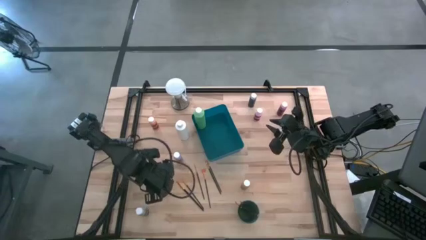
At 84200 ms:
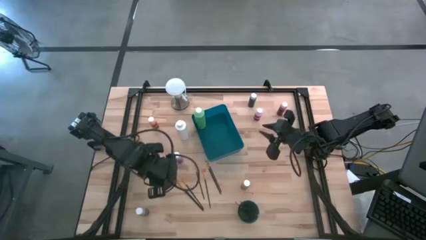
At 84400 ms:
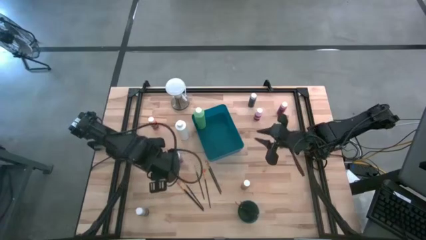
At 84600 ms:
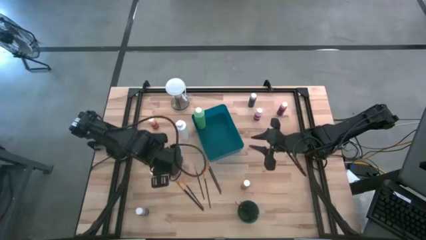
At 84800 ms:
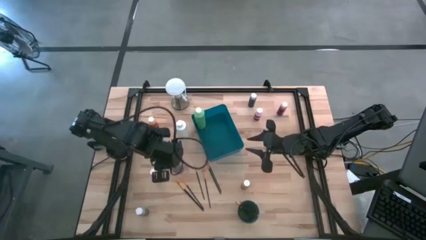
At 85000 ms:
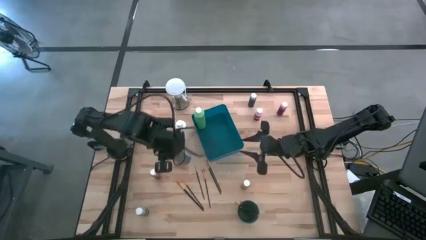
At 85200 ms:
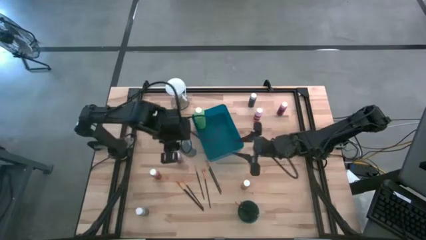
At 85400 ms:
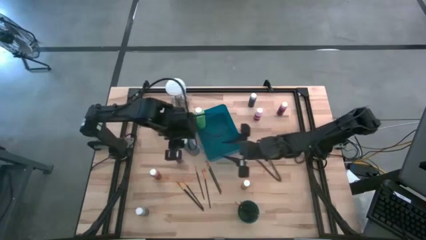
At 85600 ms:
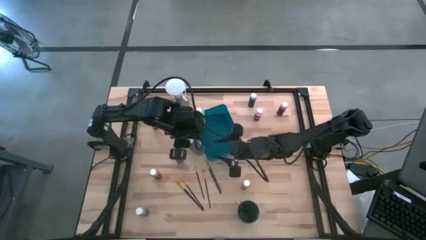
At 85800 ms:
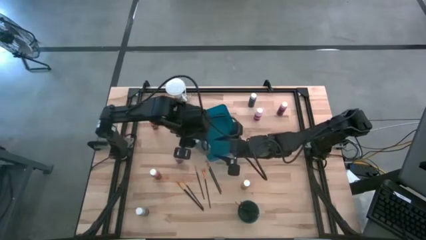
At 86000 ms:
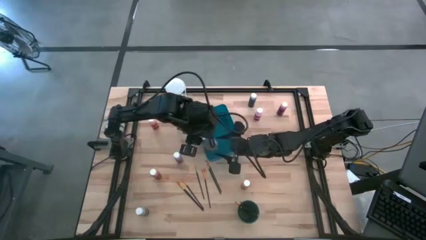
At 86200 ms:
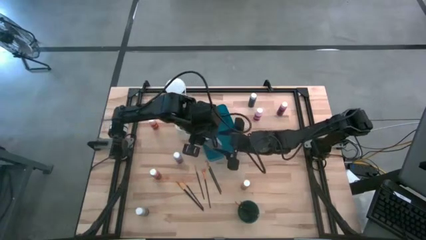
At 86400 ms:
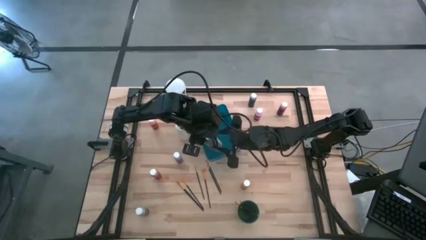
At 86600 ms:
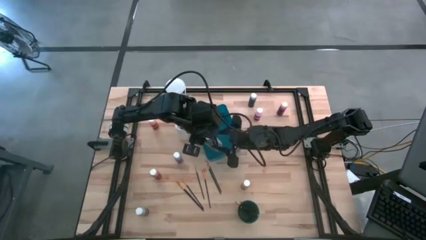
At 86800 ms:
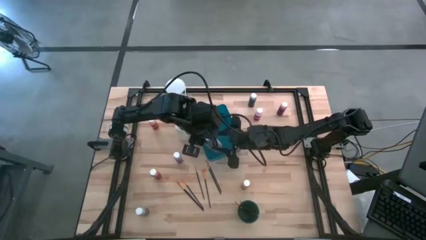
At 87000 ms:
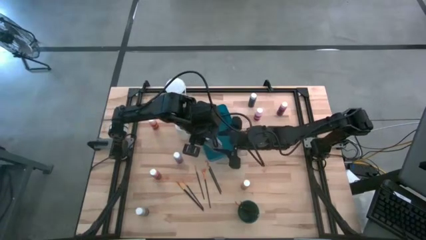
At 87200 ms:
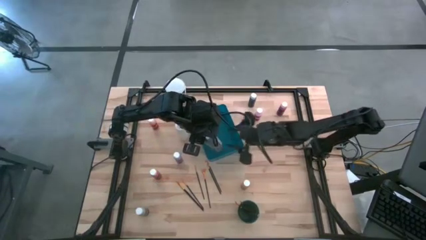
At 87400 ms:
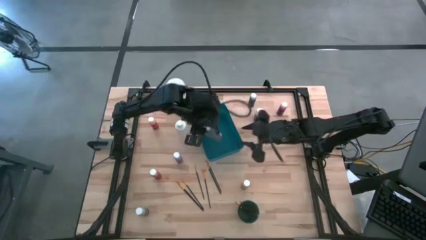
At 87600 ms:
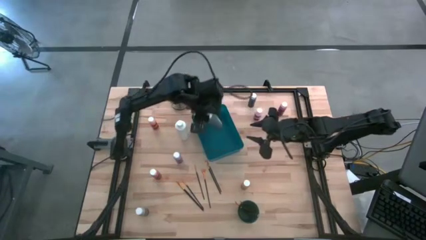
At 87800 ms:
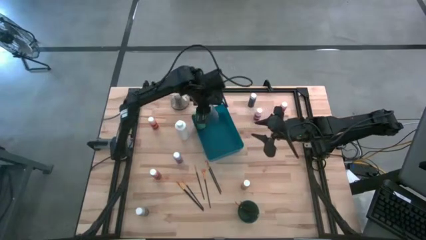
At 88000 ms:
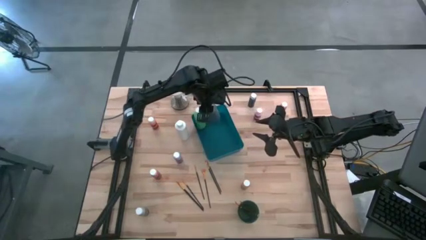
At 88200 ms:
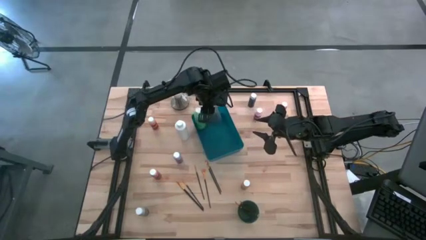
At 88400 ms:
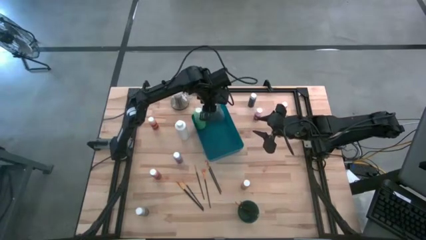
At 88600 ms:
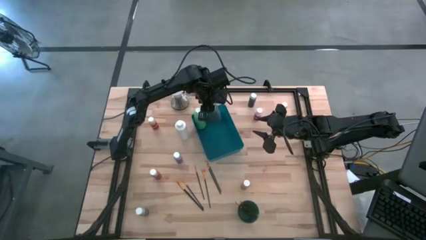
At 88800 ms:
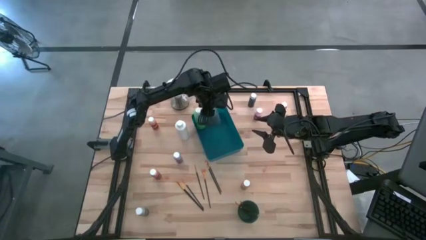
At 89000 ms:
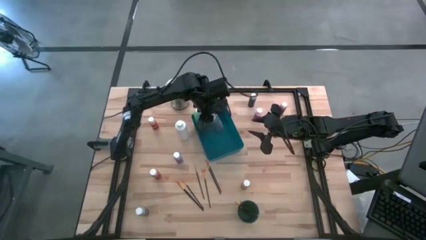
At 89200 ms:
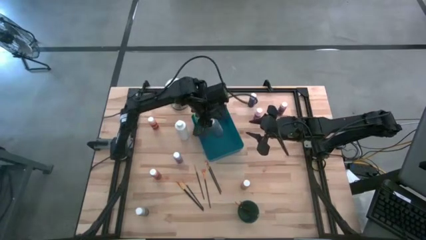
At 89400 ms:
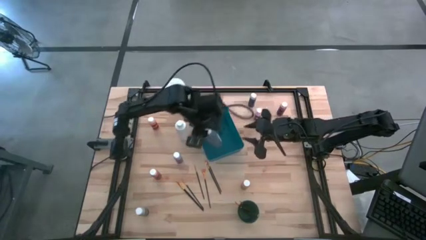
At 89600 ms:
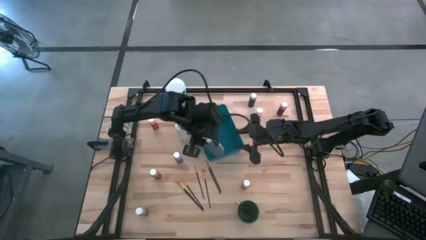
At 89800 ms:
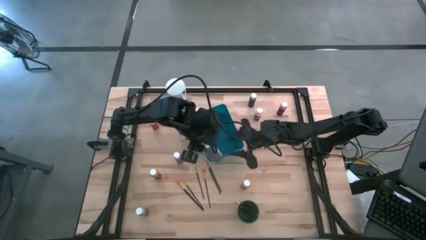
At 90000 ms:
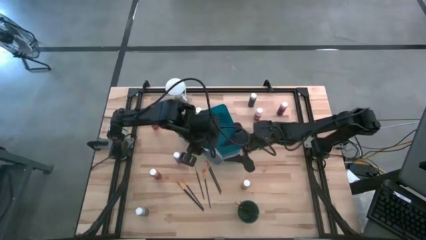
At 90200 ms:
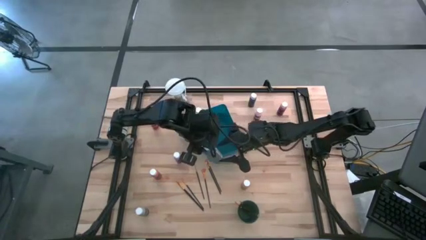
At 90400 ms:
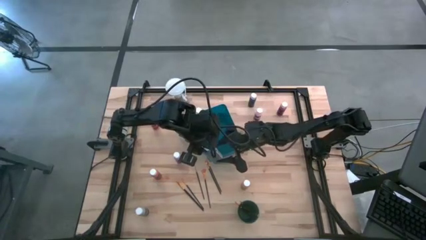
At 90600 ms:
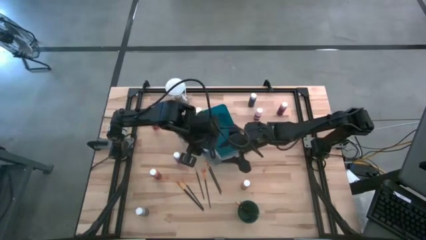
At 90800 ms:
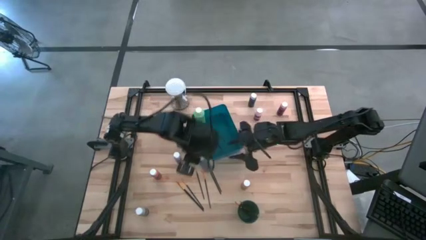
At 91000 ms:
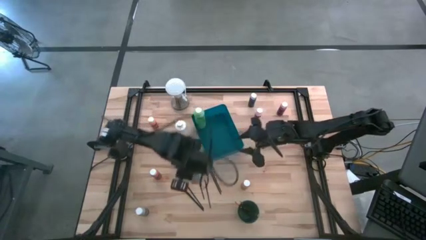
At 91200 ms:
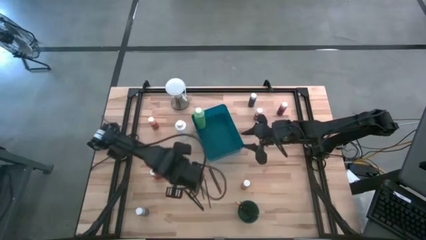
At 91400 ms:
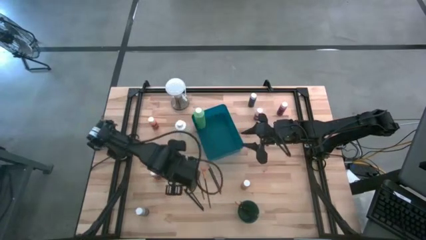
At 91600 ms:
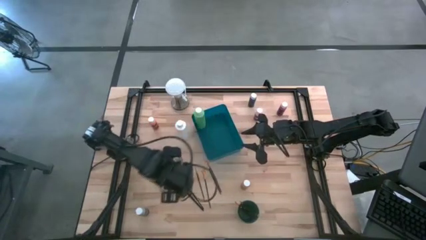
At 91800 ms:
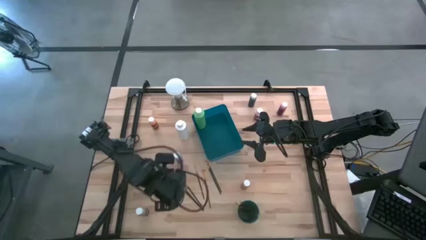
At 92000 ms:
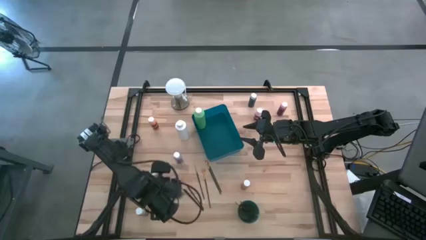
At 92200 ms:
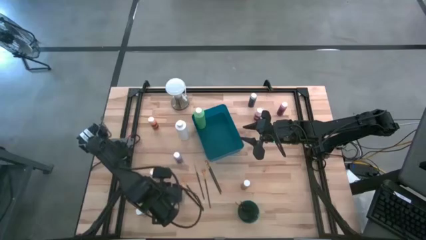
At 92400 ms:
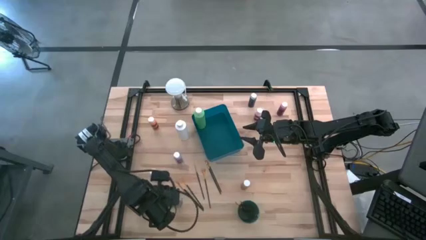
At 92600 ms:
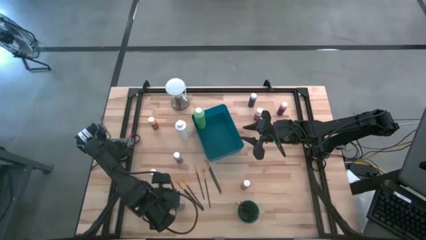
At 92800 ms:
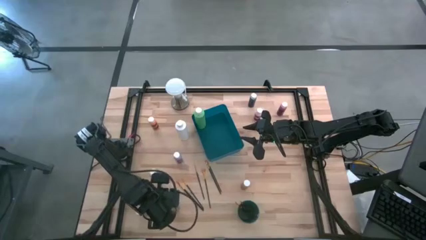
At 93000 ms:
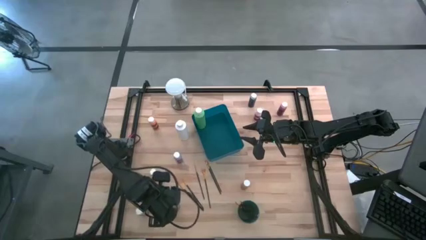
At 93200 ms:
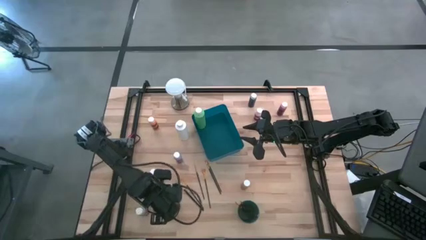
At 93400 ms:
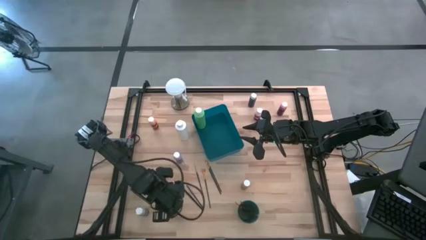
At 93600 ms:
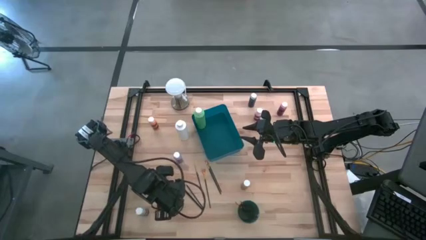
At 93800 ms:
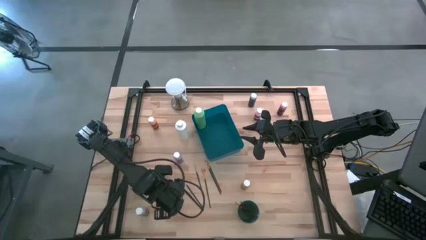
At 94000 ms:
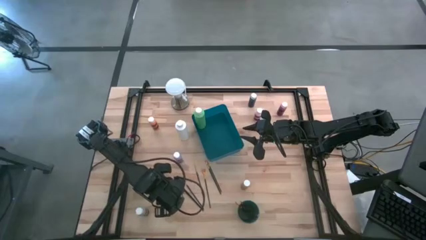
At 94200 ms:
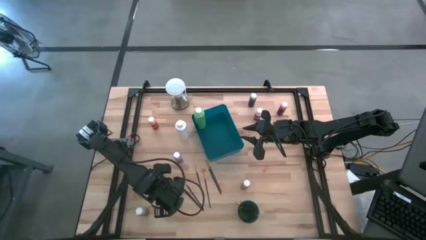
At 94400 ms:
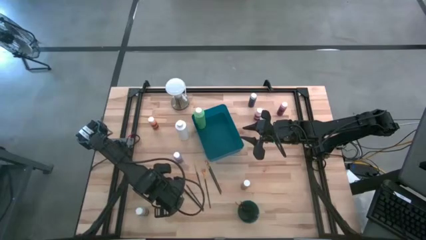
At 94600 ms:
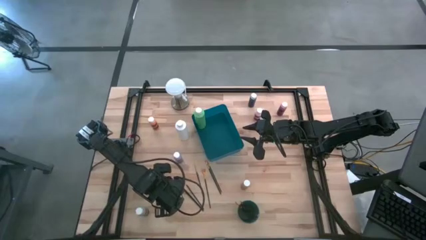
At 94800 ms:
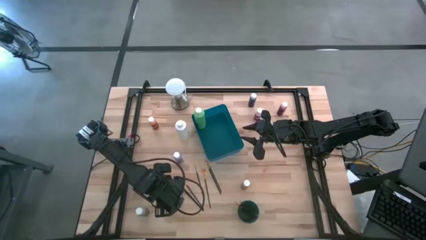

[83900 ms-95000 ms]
Task: Pick & Place Paint Supplies
Put the blue paint bottle into the blue bin
